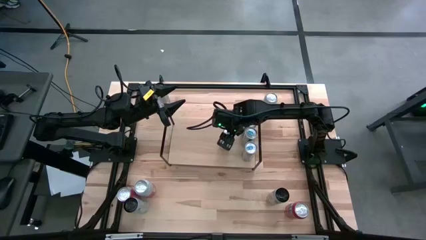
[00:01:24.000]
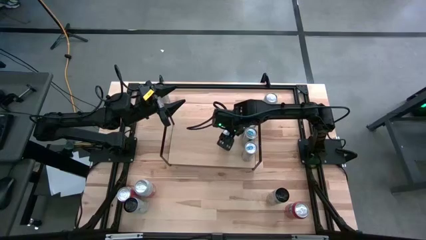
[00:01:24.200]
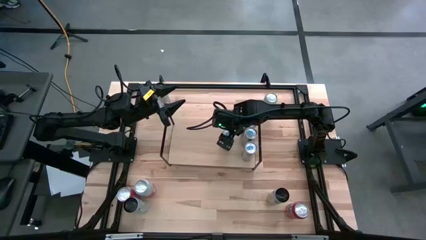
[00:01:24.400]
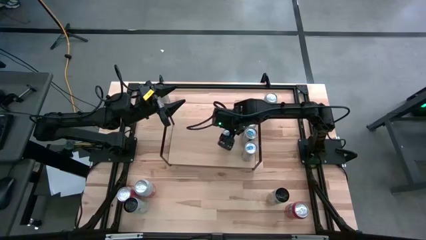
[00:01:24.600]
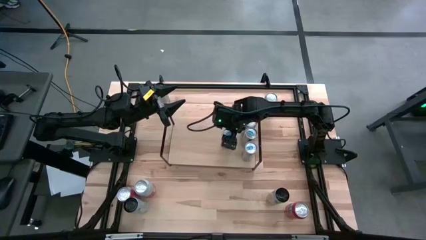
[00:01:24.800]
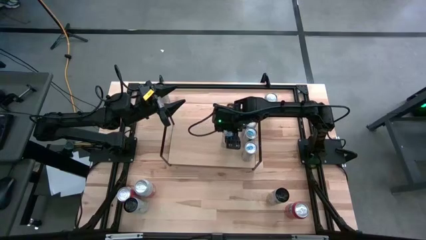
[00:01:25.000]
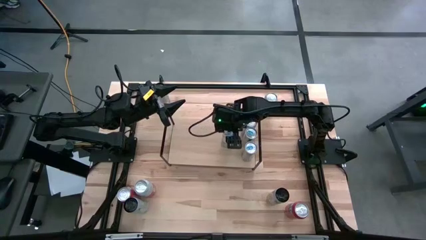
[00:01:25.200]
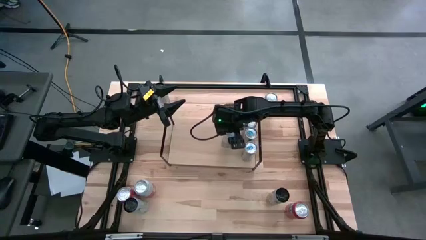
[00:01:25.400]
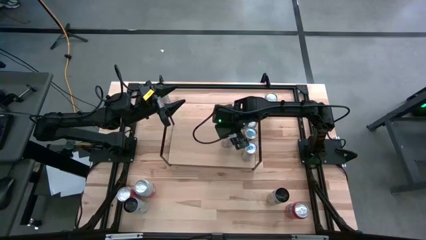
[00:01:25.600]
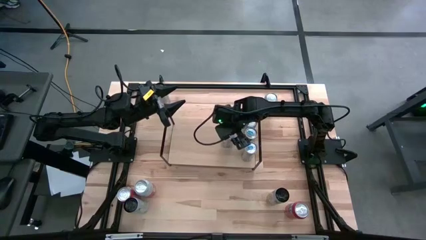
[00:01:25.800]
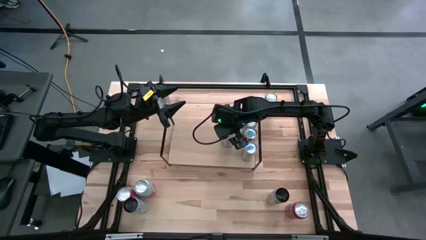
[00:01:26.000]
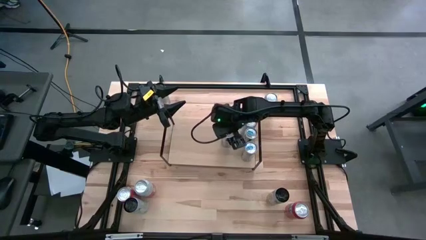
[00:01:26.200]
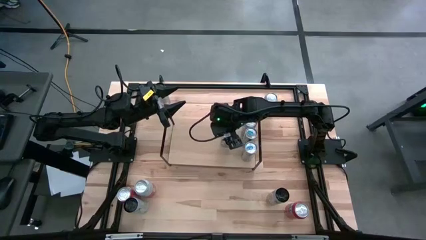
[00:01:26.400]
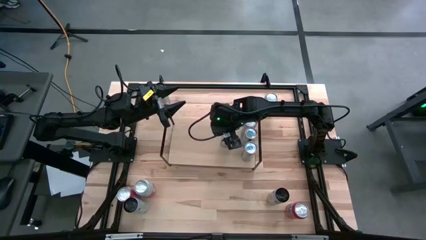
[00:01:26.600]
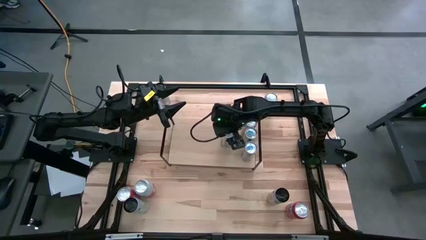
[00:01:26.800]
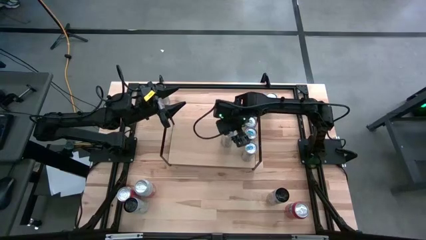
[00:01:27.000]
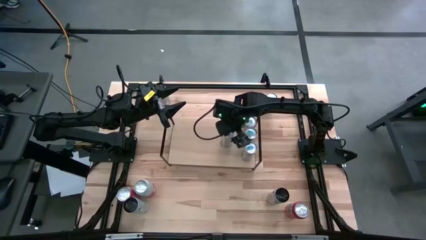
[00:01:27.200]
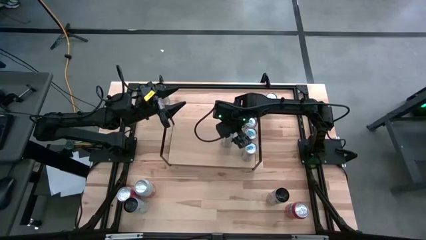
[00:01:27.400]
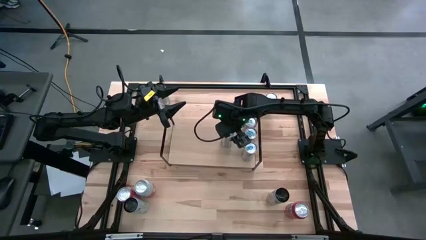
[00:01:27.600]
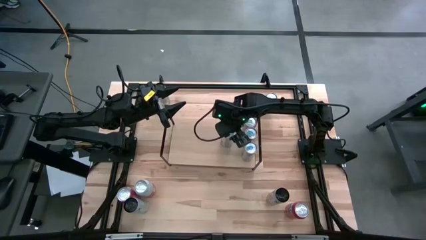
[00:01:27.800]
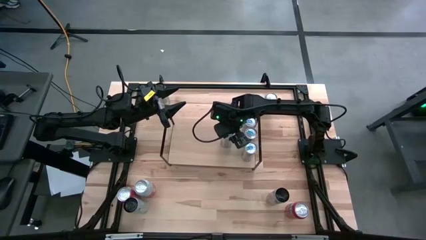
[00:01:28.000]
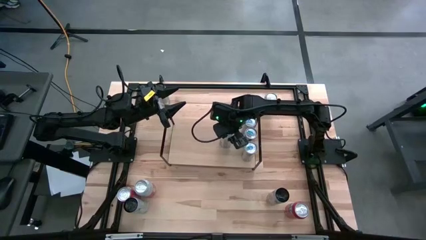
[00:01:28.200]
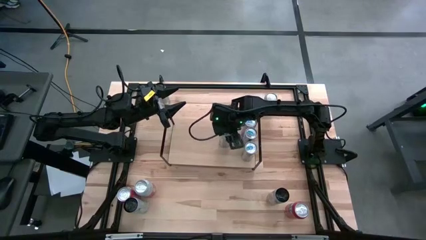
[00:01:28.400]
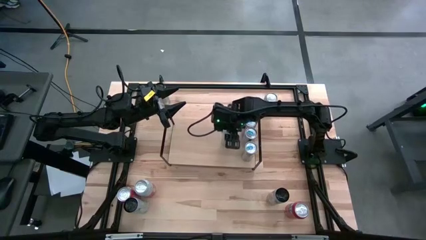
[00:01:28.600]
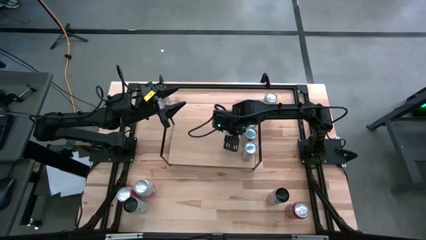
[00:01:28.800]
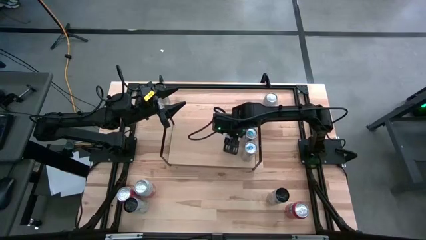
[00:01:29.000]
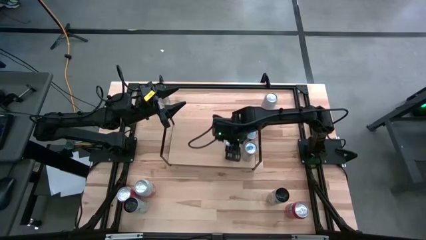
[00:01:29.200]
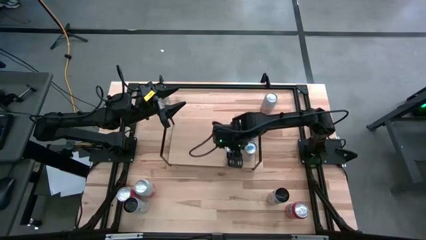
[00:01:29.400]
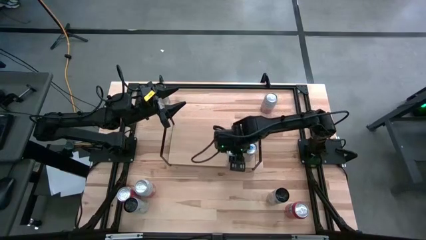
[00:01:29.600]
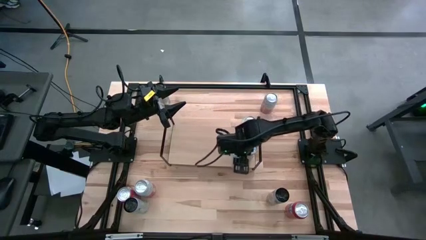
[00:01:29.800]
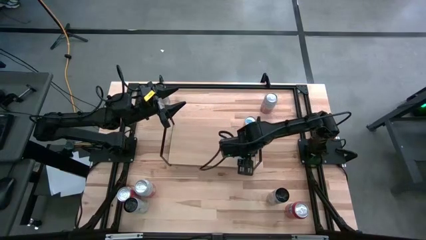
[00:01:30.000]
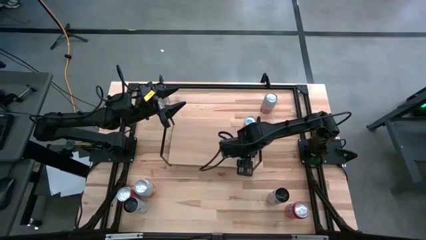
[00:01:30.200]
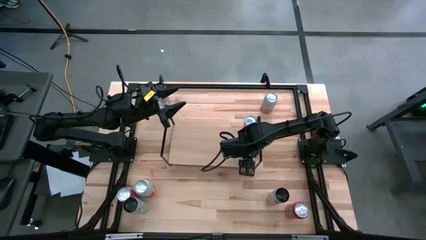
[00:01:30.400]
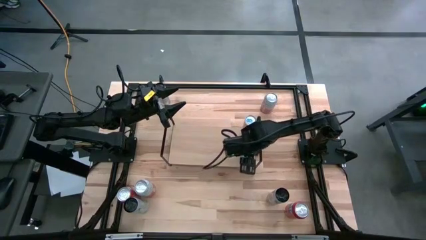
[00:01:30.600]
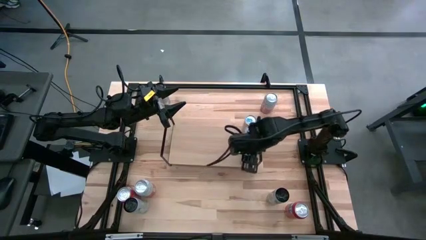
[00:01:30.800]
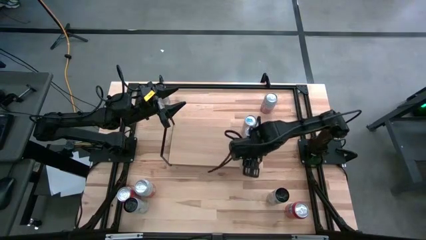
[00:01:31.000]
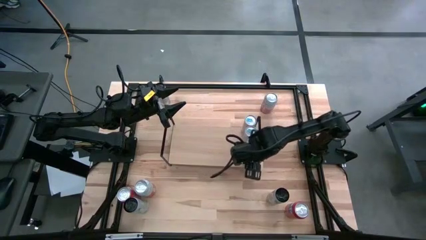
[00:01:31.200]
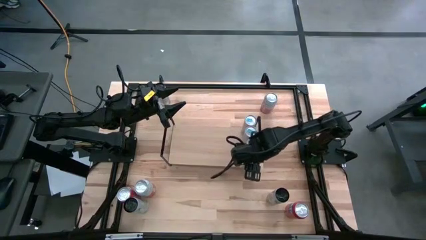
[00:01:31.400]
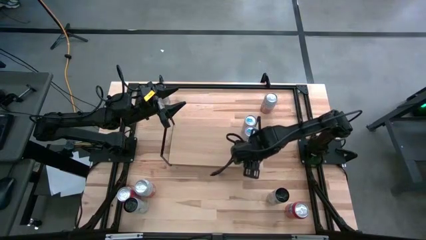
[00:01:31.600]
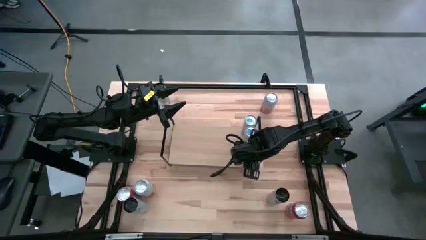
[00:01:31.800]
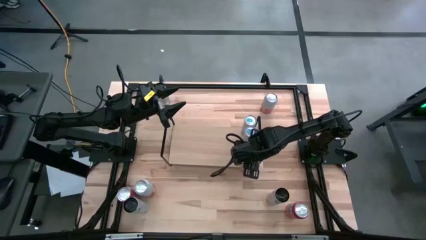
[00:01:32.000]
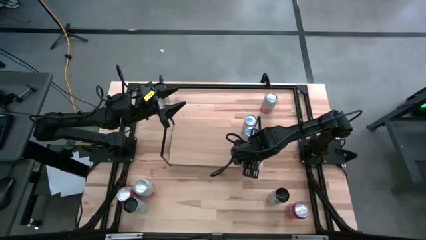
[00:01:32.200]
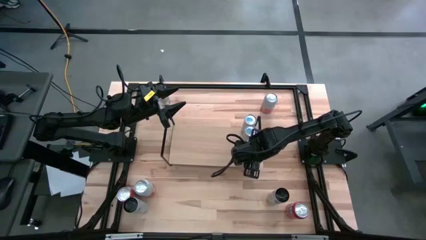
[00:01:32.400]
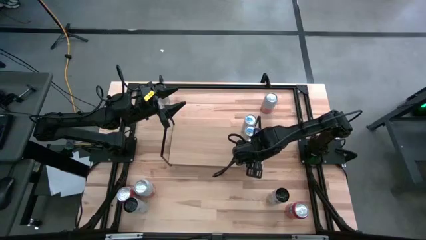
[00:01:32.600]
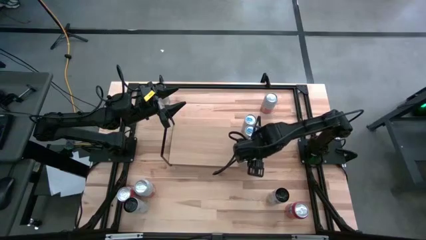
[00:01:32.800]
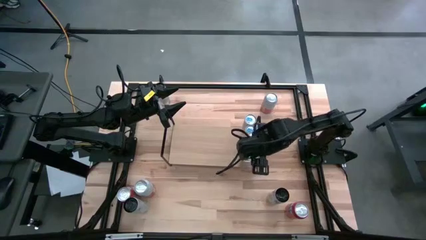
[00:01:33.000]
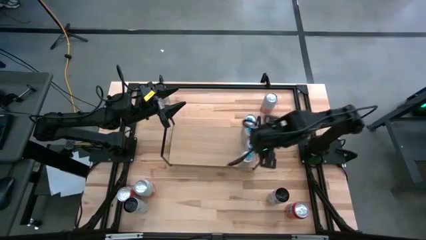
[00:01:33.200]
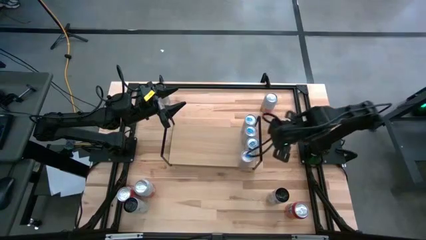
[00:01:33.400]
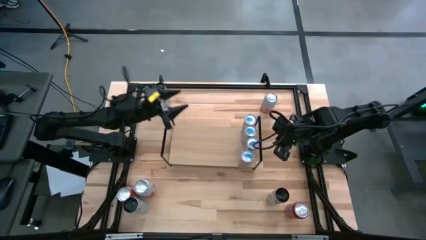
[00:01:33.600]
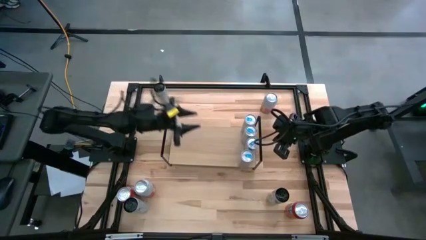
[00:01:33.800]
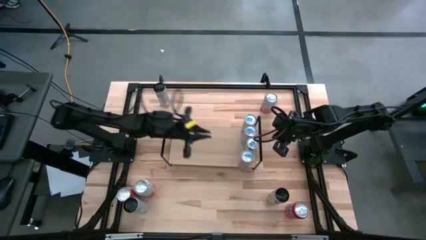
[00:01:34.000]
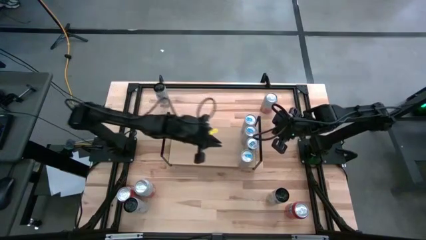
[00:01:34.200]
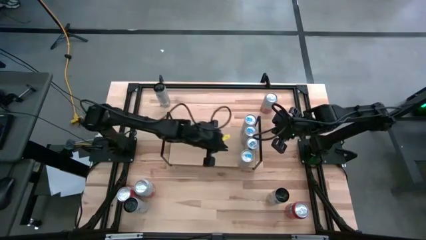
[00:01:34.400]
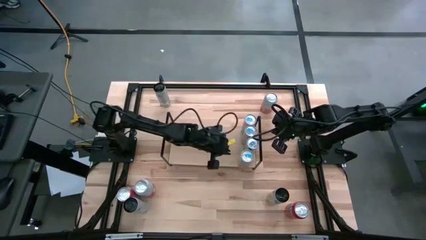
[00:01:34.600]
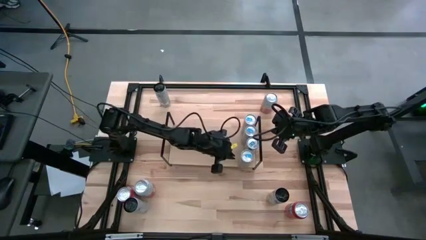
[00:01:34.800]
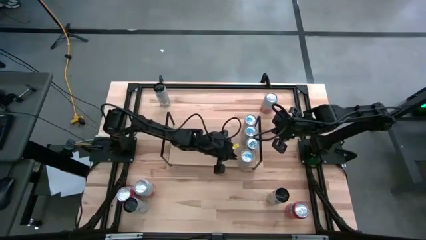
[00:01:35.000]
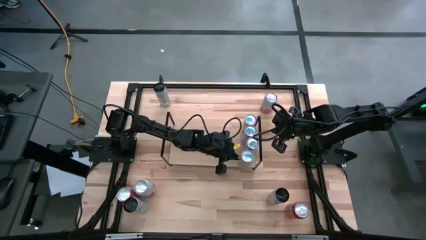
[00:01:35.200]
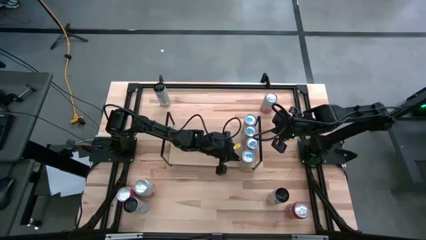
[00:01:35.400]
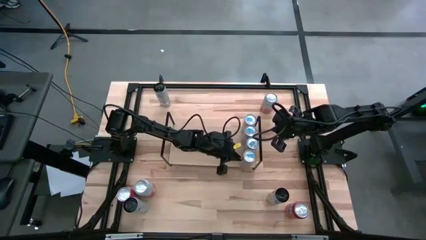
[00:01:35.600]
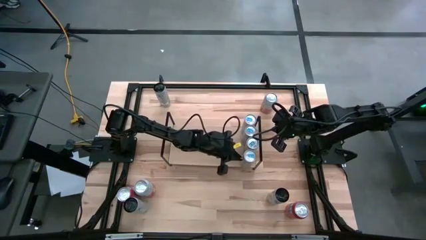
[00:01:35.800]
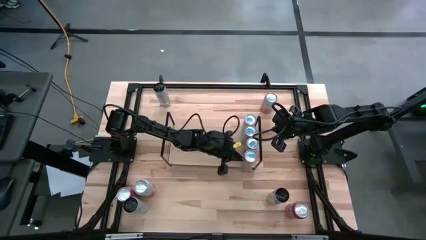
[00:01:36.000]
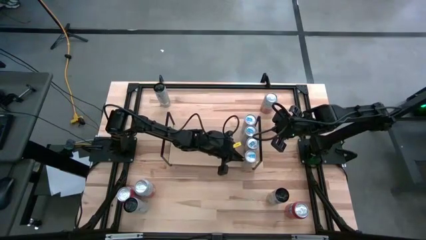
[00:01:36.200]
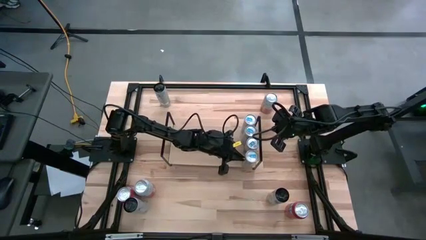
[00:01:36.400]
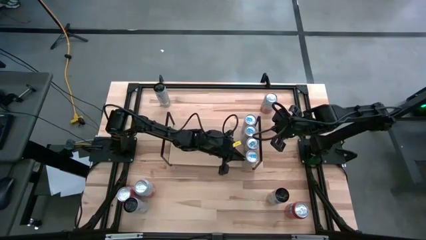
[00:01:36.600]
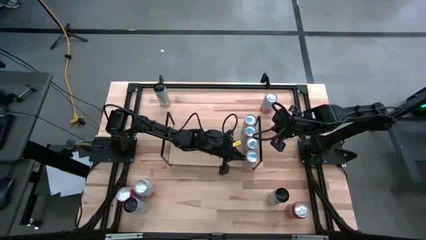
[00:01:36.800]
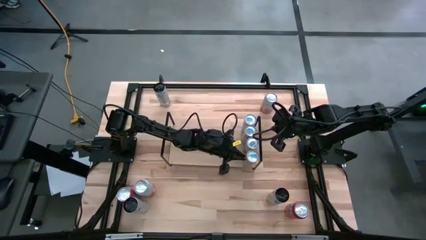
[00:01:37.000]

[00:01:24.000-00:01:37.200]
Task: Place canned beverage on shelf
Put the blue soda can aligned with the other blue soda can on the shelf
